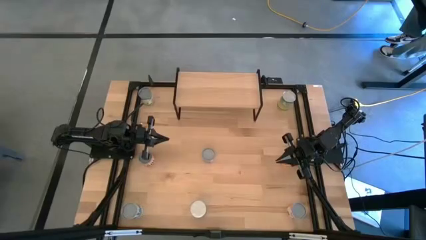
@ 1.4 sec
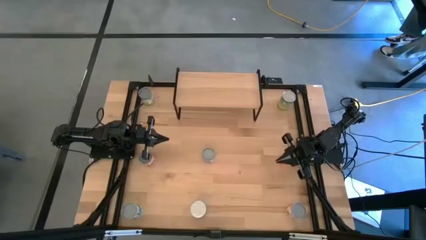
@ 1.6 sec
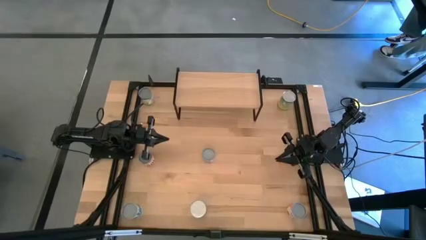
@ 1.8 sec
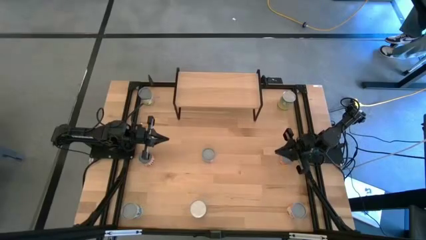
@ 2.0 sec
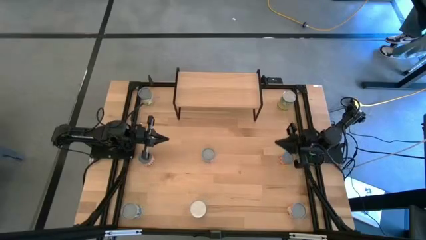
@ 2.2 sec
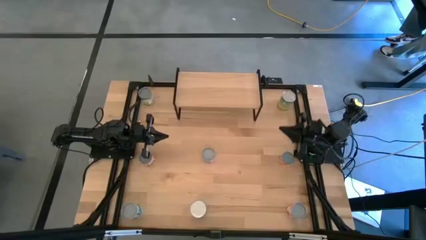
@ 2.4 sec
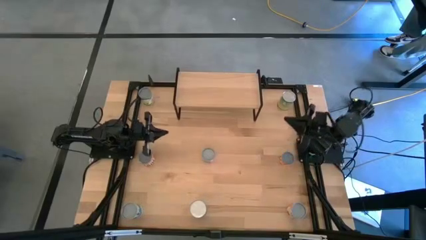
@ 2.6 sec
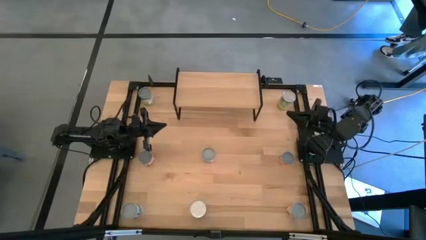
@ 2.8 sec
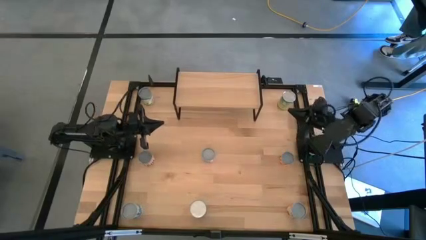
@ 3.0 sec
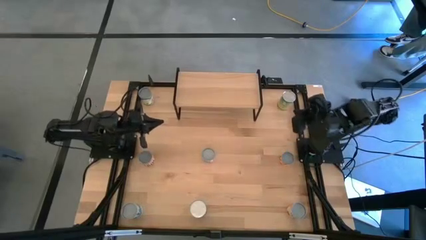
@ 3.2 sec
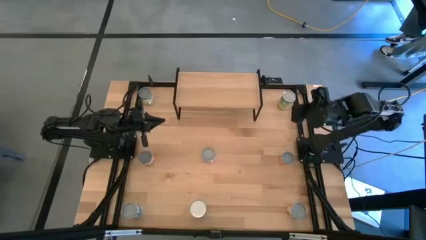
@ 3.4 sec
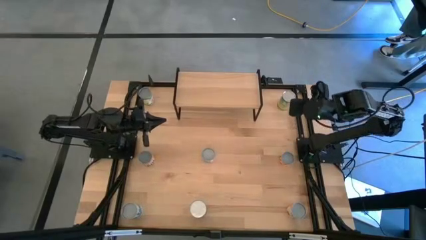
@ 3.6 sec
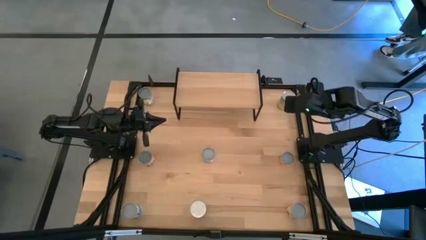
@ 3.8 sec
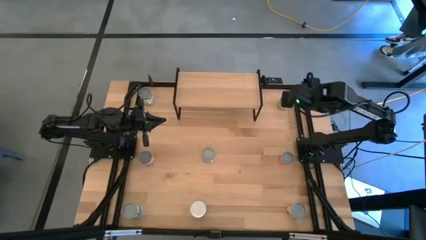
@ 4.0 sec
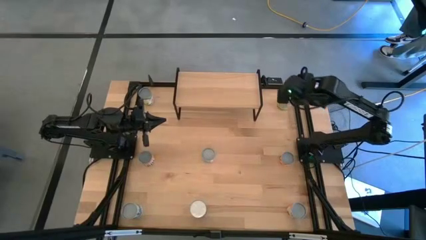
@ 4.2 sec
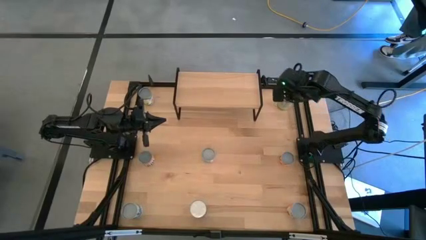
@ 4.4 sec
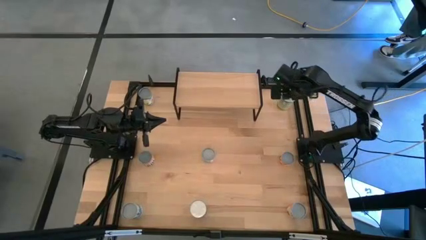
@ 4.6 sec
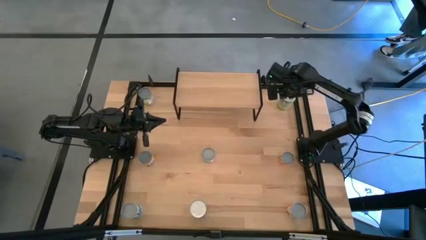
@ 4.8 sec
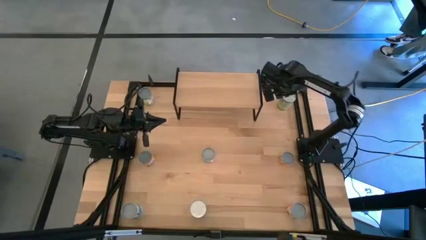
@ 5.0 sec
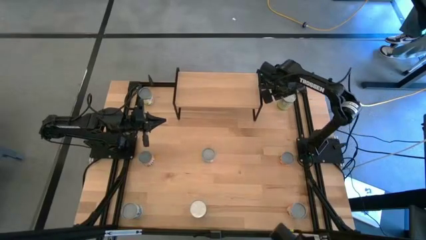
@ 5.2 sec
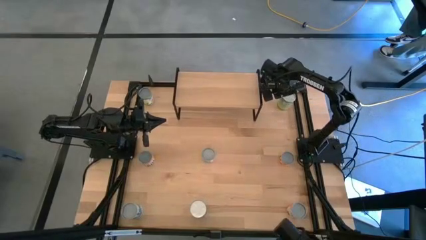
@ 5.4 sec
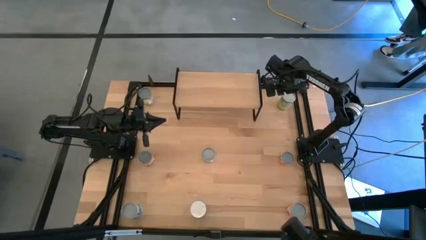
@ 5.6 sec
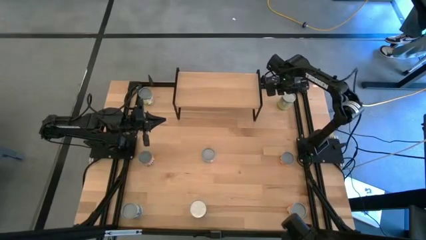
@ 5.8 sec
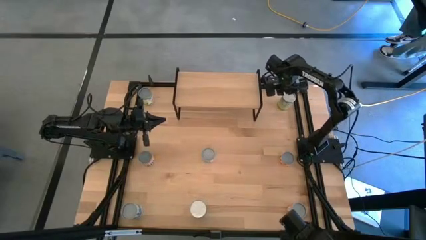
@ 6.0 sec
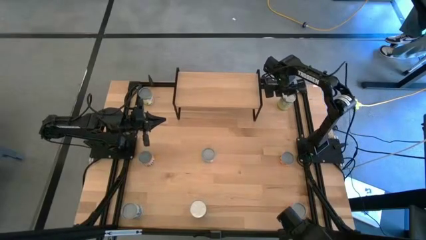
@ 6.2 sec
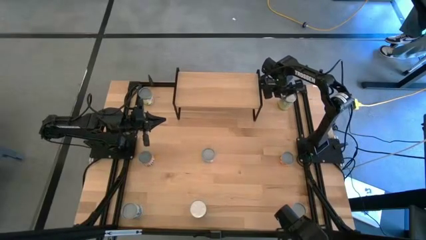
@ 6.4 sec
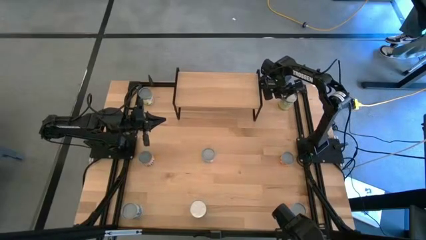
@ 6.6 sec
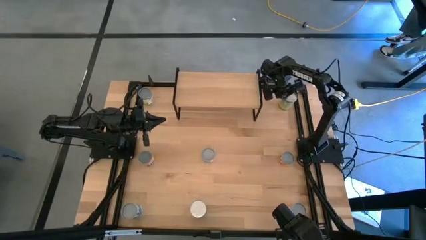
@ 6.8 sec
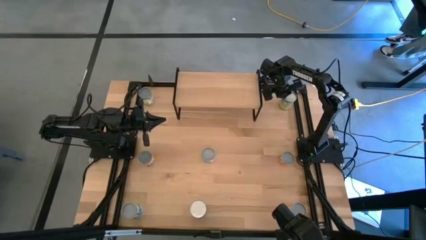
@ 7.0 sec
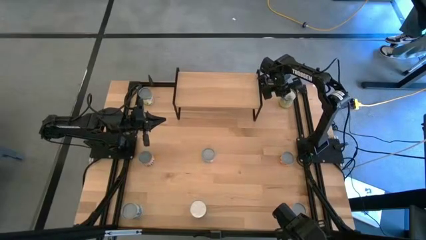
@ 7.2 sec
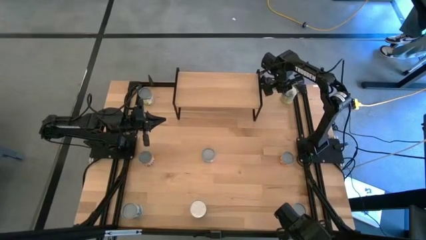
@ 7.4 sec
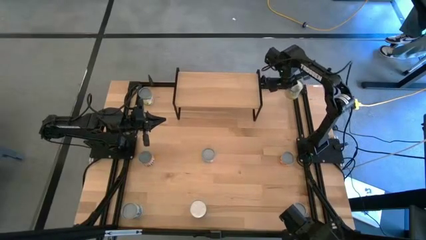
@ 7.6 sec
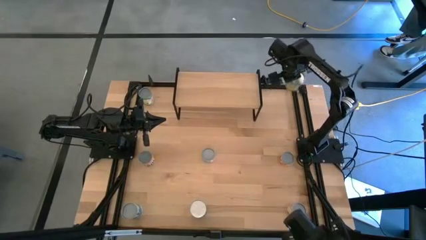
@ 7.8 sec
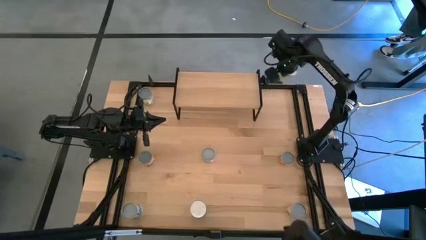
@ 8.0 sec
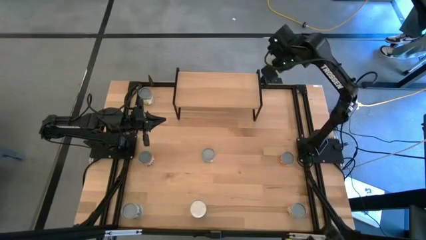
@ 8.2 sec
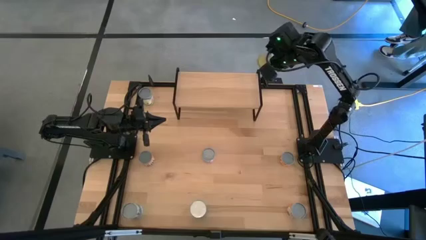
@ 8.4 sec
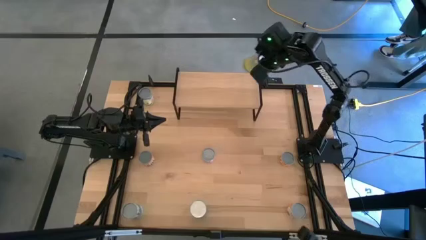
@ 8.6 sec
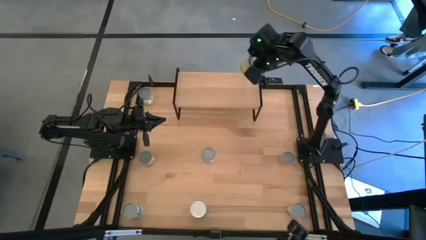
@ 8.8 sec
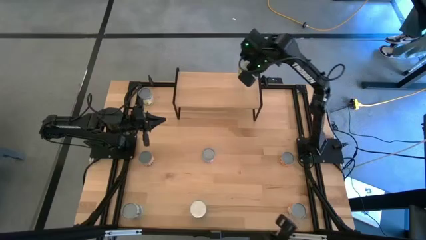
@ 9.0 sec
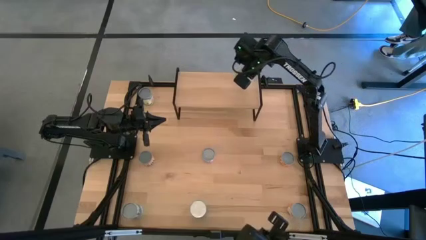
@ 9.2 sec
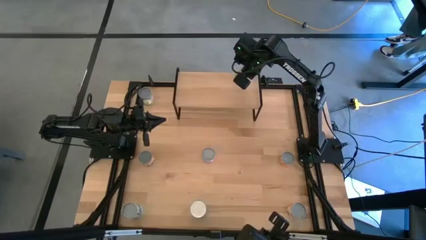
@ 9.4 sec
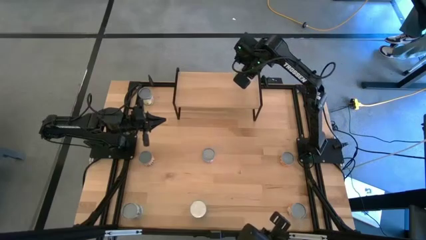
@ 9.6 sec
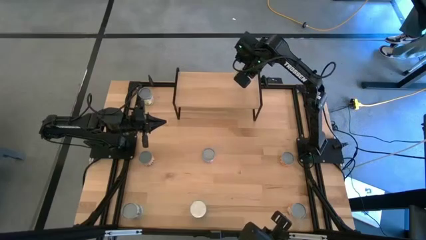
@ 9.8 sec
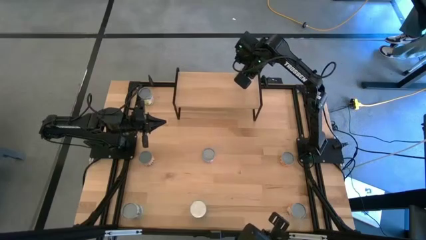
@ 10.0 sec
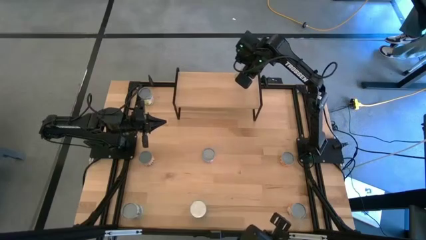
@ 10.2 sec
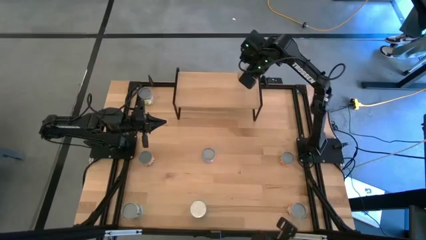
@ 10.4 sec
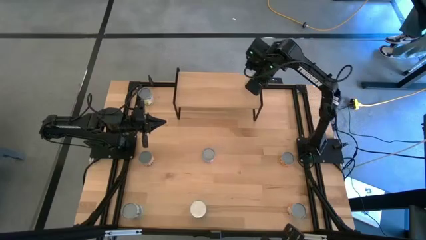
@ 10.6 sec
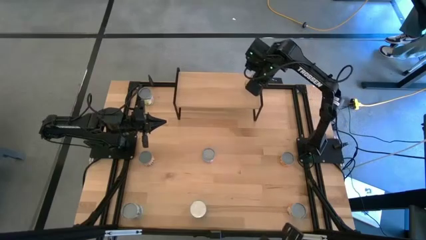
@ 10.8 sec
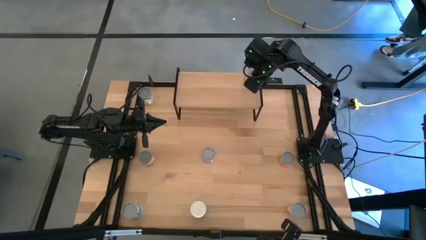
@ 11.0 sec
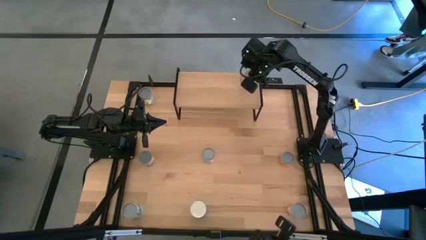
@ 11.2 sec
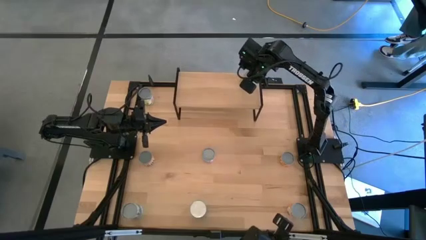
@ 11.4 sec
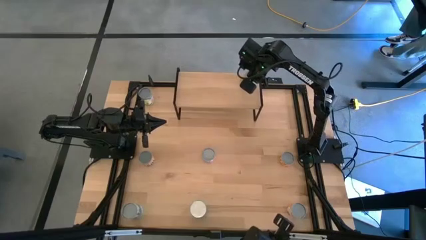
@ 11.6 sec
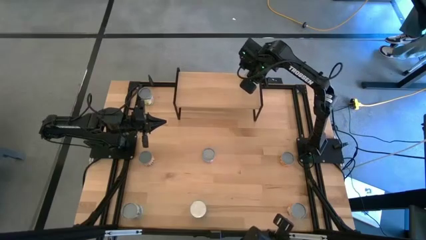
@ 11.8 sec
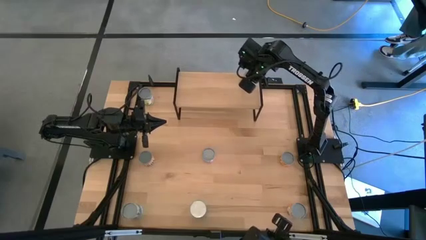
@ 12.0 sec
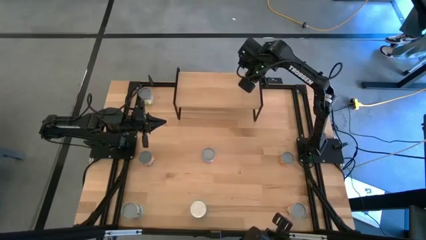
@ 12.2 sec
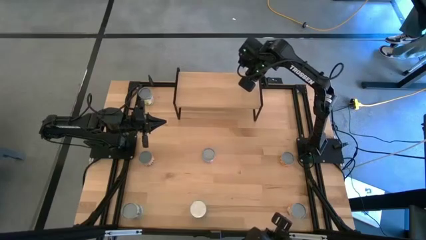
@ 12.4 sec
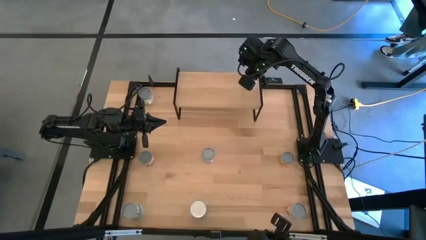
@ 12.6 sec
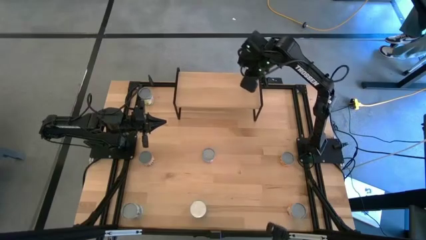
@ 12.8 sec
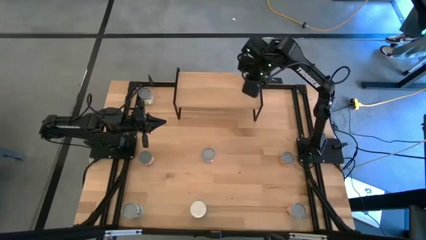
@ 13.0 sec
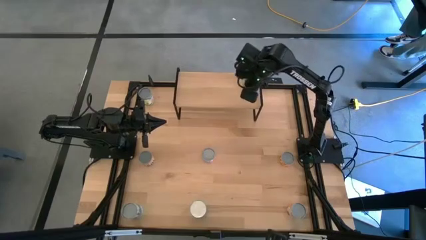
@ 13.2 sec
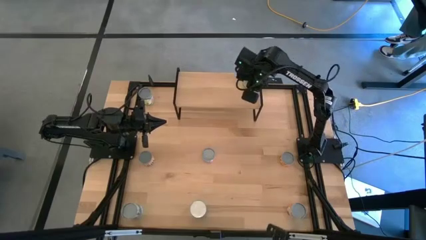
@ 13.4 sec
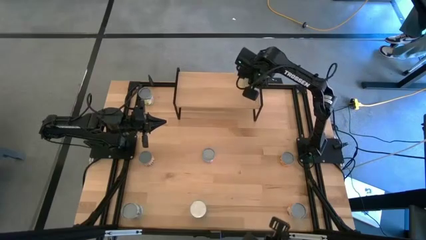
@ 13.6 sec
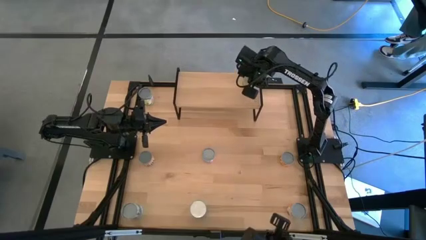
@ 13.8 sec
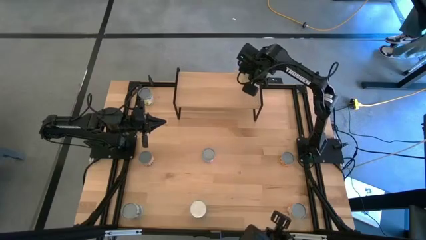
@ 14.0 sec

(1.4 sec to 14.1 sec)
Task: Pick and place cans onto a shelf
Put the canned carrots on the shelf

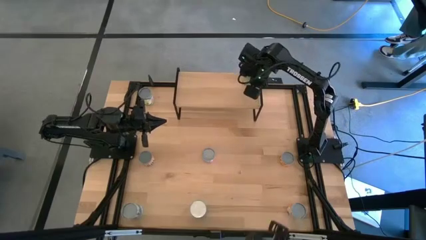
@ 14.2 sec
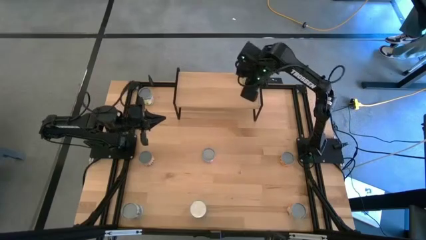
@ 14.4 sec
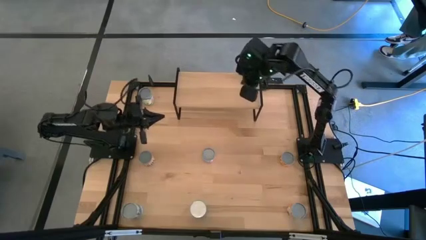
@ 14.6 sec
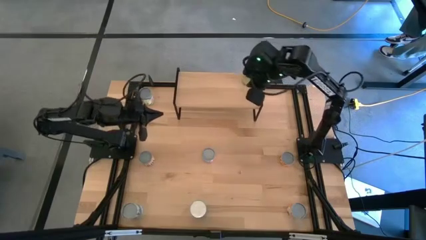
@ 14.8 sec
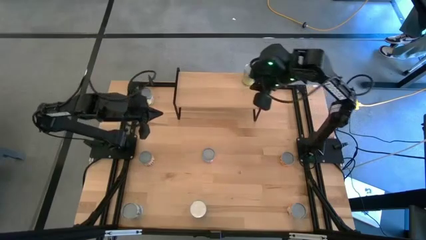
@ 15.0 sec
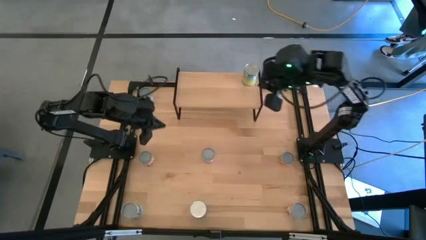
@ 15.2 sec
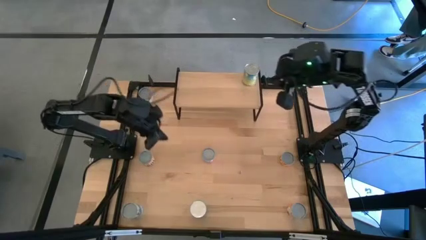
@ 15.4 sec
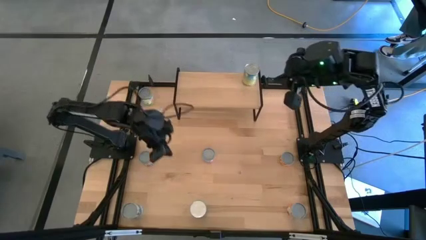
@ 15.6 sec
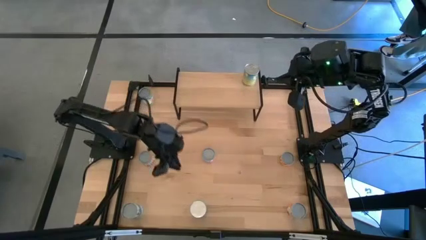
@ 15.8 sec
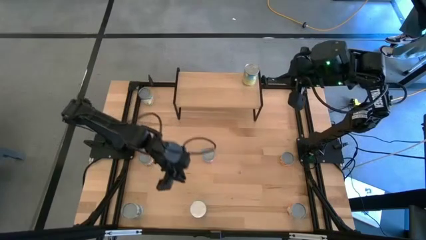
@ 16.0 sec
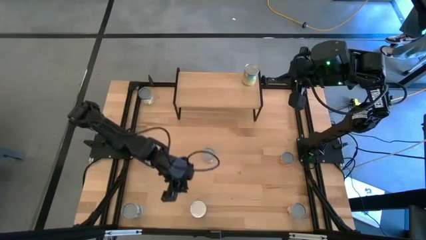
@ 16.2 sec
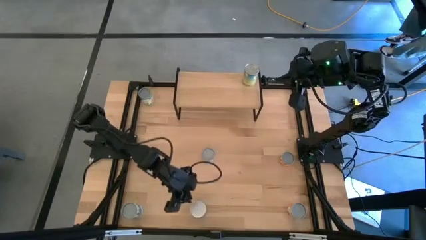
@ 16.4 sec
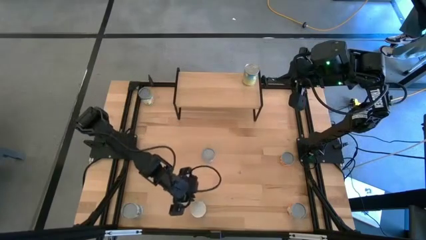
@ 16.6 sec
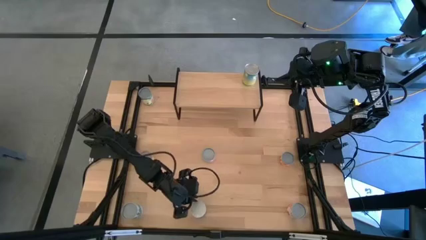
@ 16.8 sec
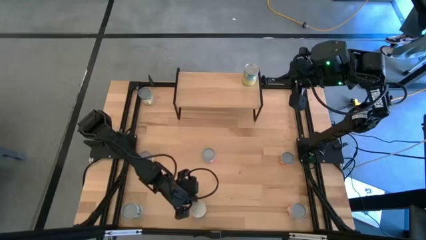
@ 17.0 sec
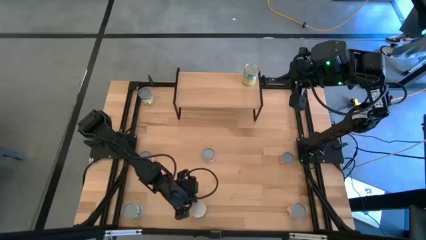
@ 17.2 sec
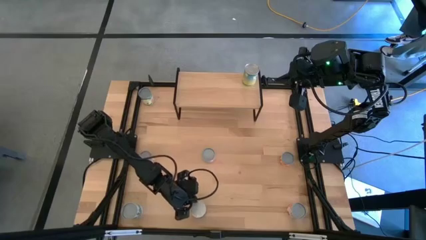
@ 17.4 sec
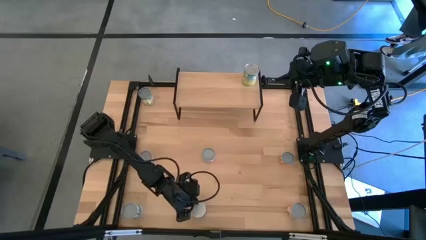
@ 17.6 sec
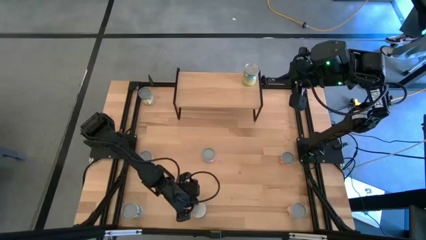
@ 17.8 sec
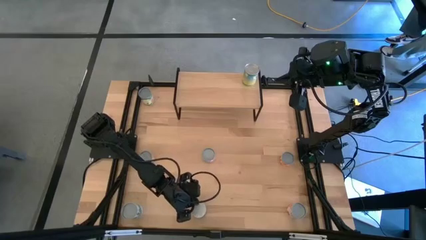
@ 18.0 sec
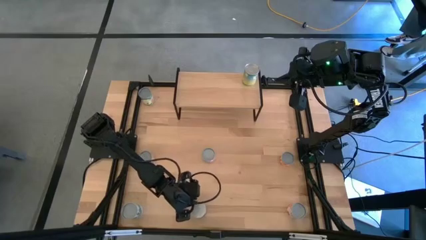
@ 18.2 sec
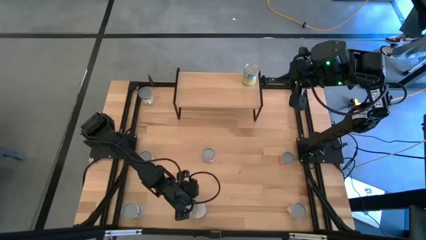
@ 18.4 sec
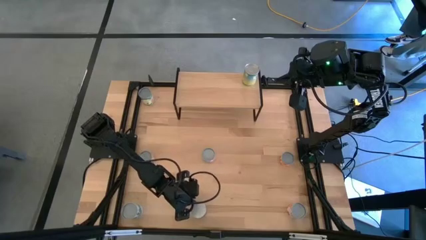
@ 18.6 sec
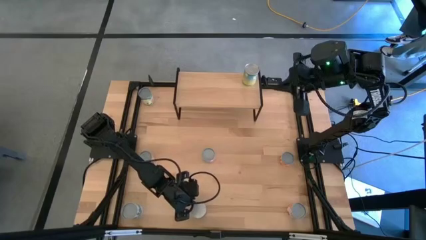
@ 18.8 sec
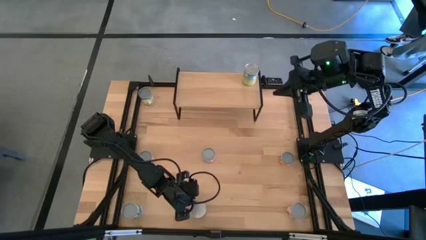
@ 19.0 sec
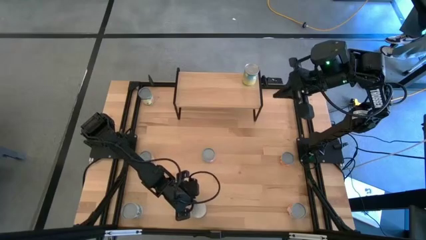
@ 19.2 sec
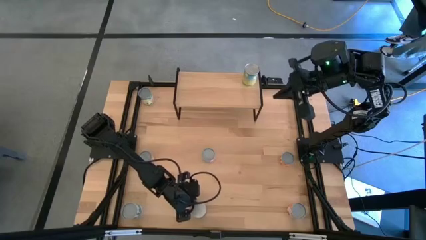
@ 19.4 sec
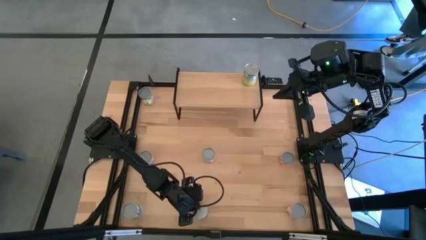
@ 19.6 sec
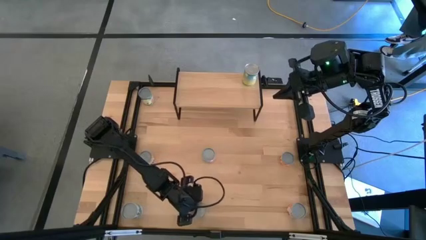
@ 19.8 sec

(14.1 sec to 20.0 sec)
Put the canned cherries on the shelf
